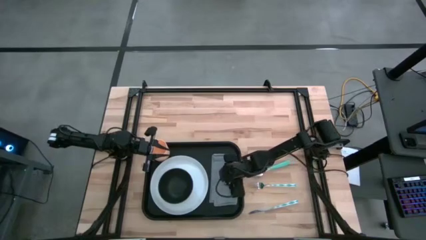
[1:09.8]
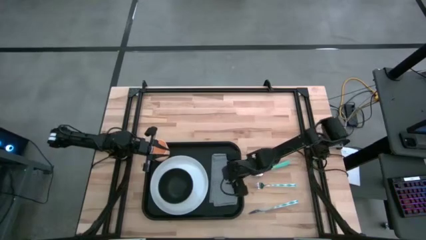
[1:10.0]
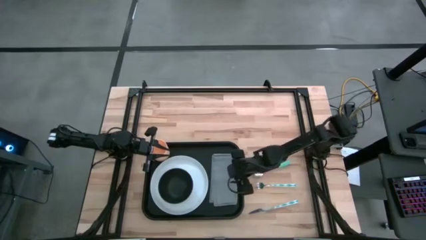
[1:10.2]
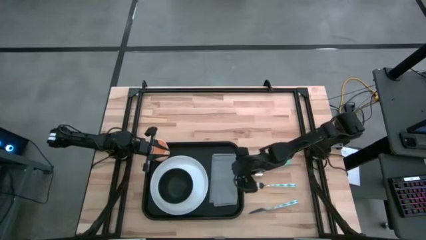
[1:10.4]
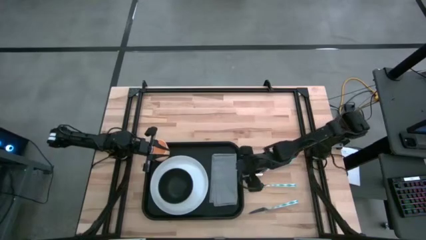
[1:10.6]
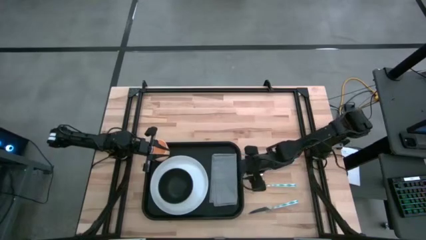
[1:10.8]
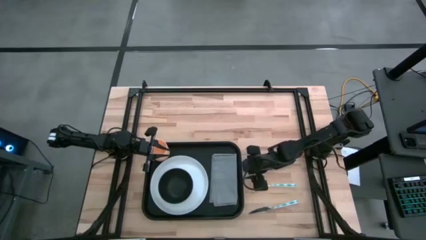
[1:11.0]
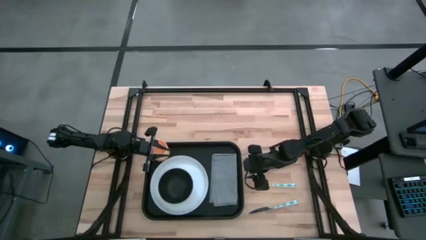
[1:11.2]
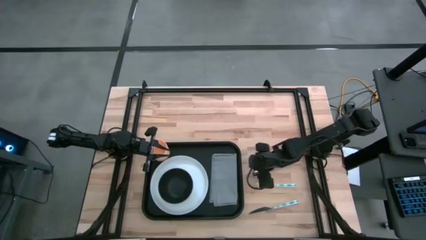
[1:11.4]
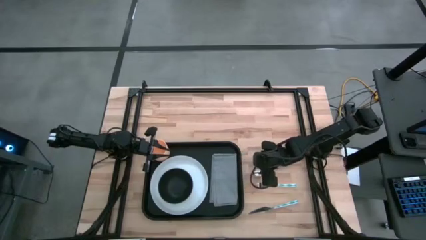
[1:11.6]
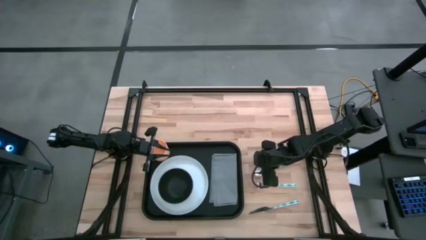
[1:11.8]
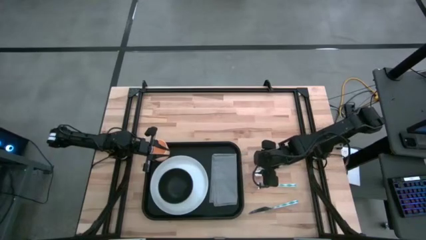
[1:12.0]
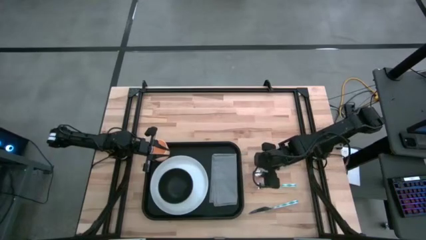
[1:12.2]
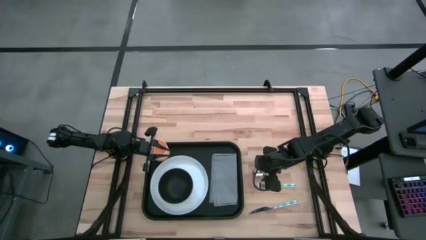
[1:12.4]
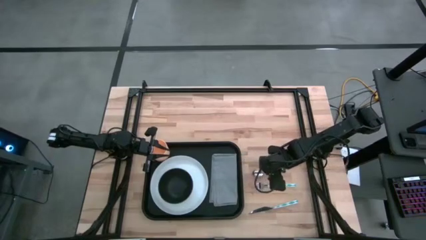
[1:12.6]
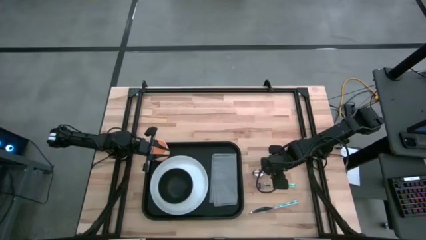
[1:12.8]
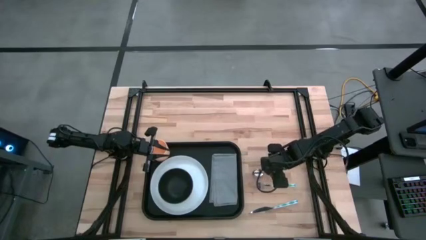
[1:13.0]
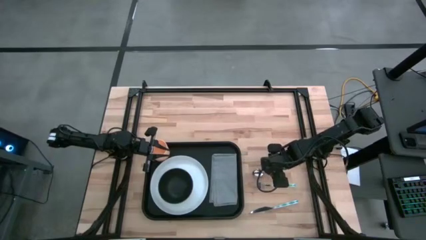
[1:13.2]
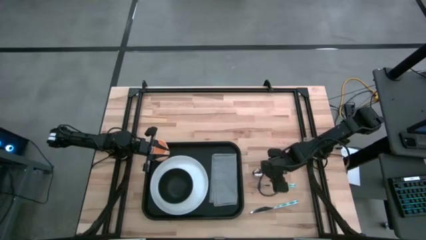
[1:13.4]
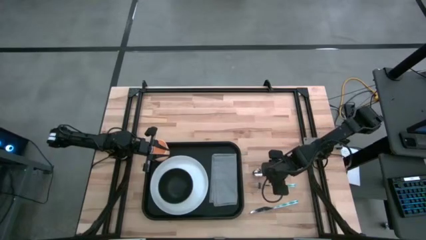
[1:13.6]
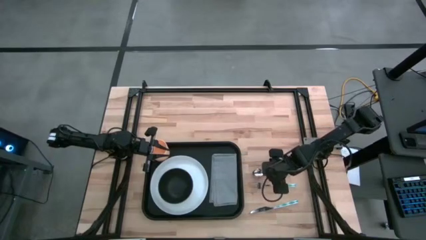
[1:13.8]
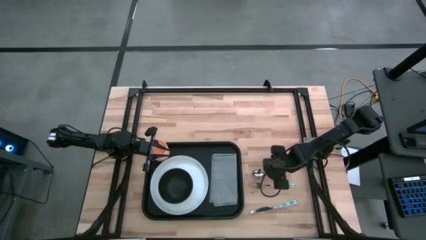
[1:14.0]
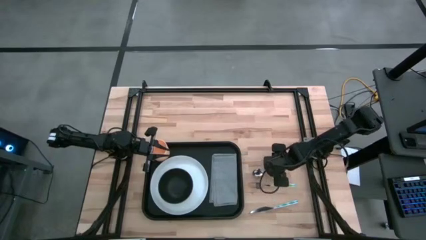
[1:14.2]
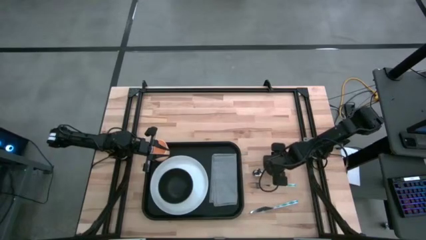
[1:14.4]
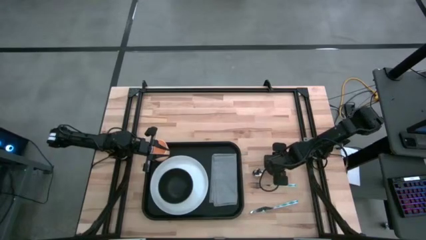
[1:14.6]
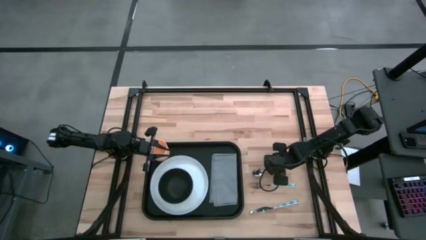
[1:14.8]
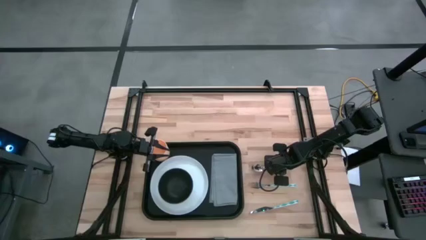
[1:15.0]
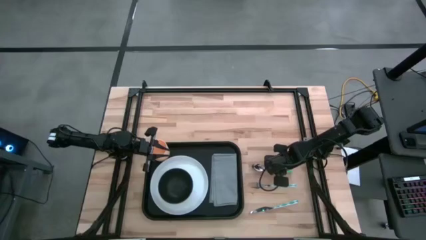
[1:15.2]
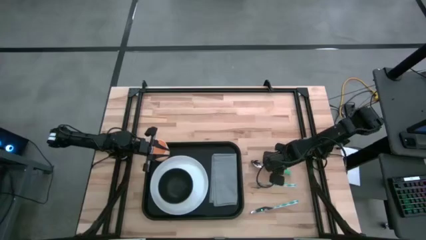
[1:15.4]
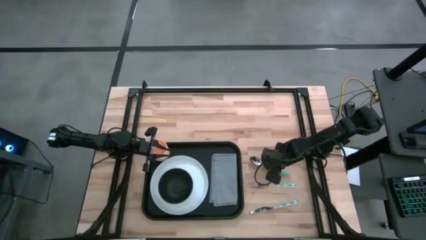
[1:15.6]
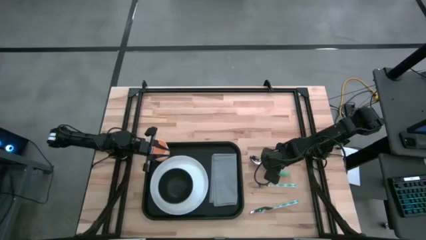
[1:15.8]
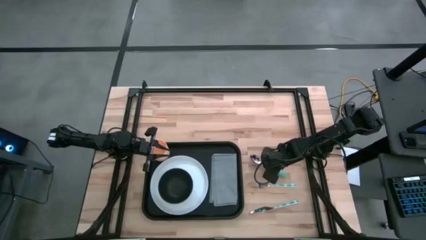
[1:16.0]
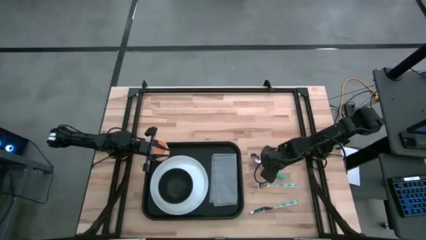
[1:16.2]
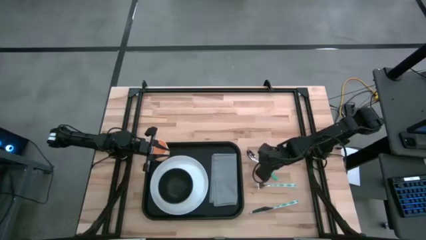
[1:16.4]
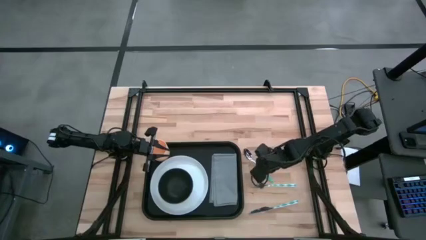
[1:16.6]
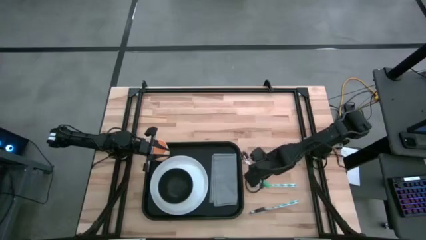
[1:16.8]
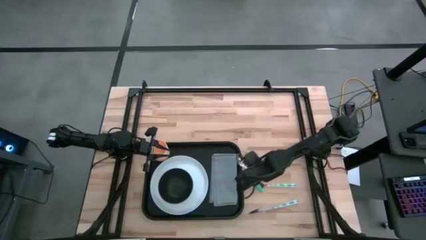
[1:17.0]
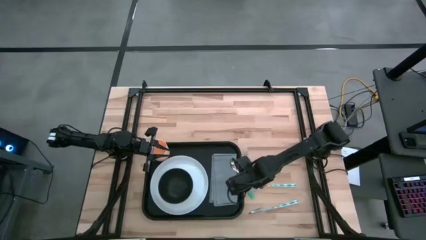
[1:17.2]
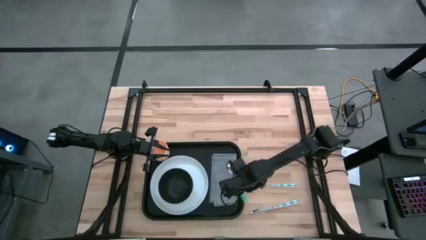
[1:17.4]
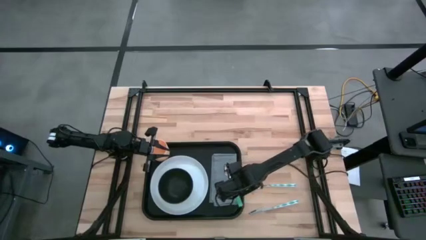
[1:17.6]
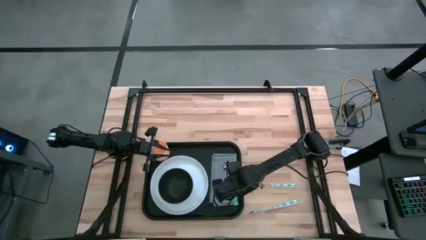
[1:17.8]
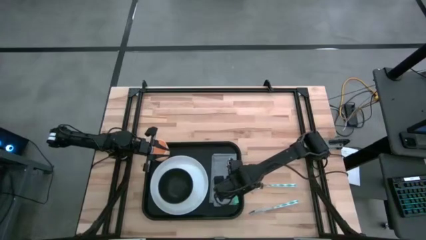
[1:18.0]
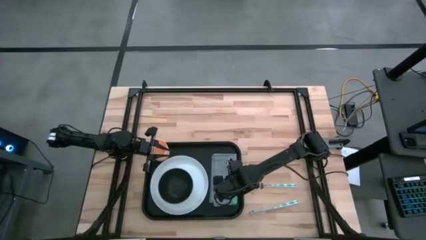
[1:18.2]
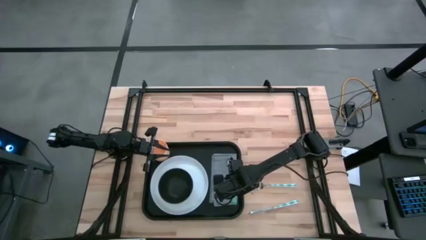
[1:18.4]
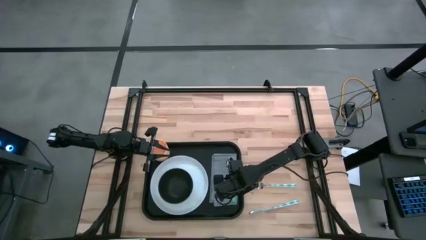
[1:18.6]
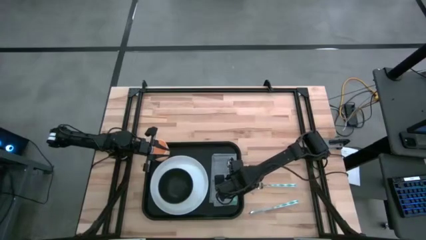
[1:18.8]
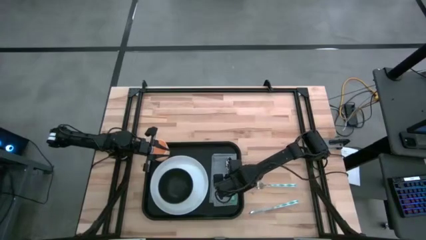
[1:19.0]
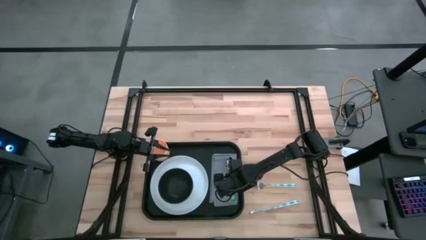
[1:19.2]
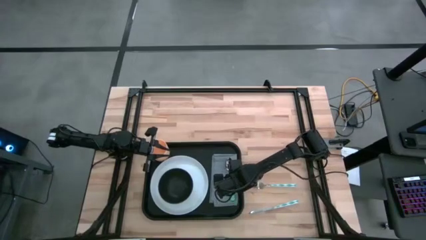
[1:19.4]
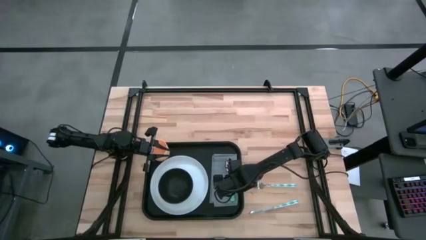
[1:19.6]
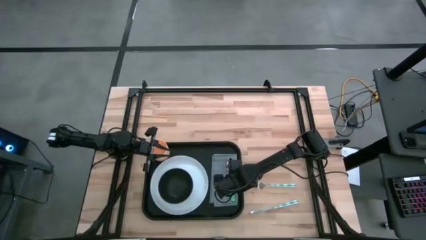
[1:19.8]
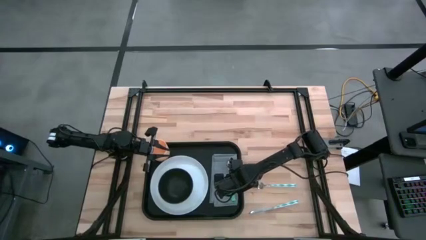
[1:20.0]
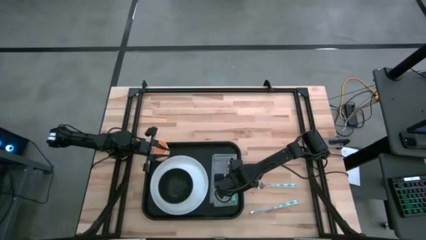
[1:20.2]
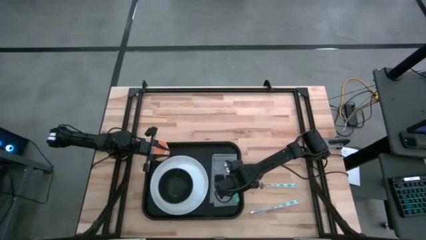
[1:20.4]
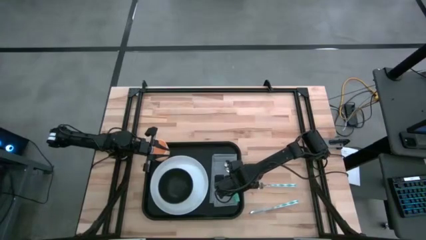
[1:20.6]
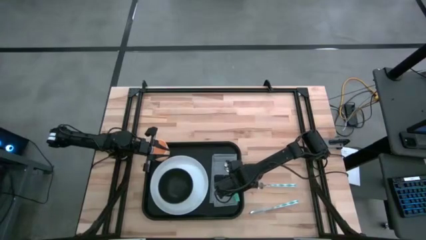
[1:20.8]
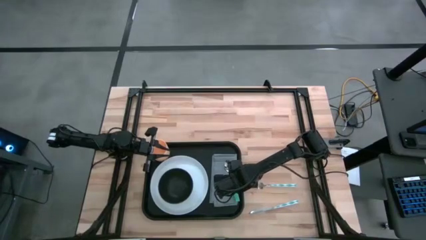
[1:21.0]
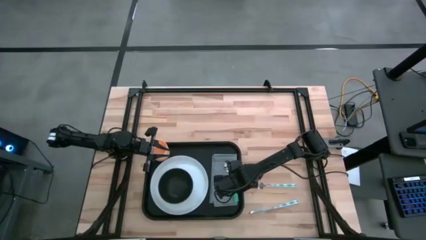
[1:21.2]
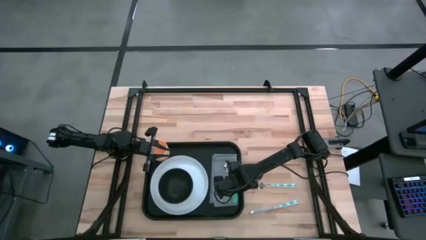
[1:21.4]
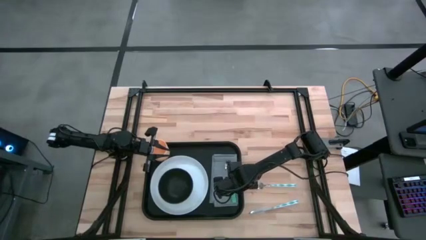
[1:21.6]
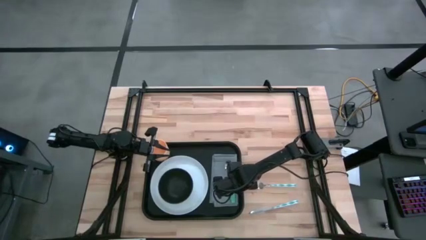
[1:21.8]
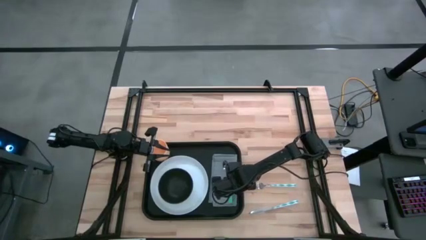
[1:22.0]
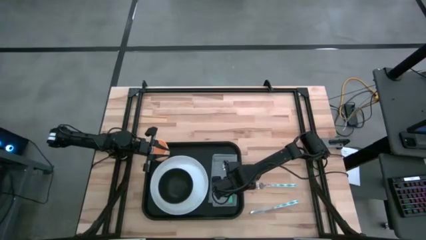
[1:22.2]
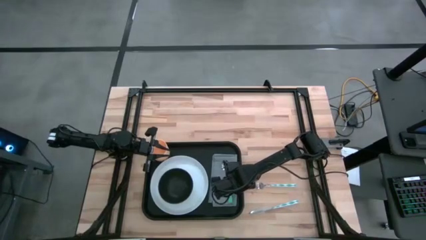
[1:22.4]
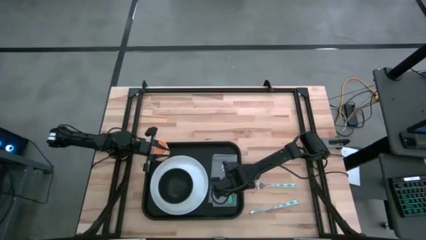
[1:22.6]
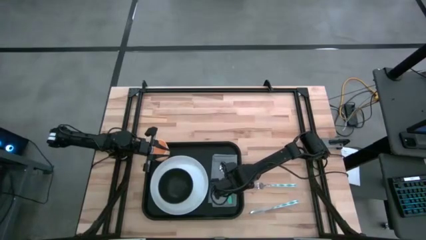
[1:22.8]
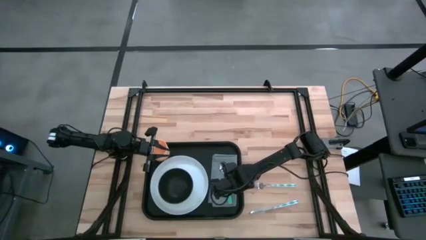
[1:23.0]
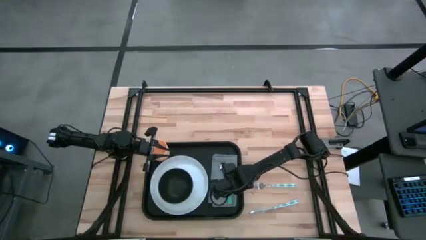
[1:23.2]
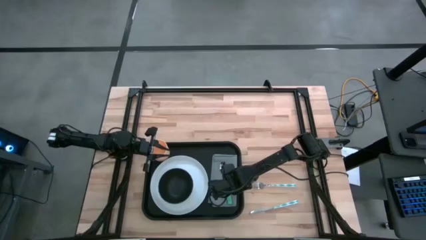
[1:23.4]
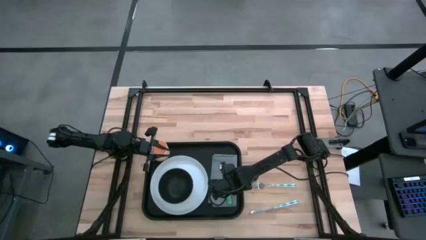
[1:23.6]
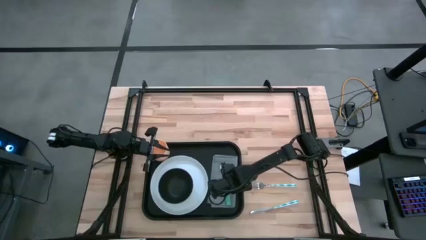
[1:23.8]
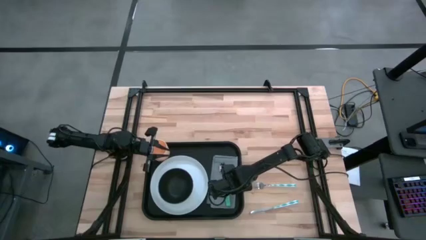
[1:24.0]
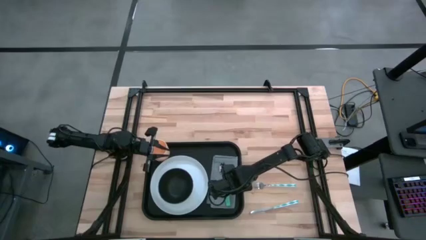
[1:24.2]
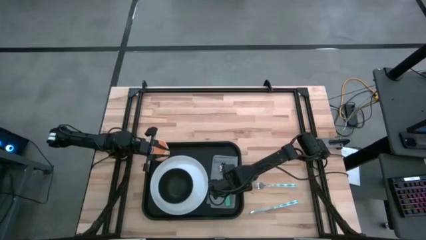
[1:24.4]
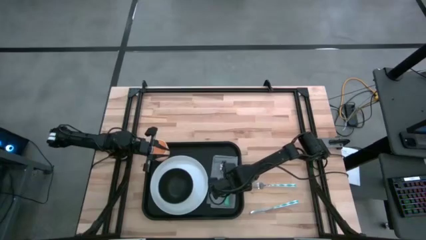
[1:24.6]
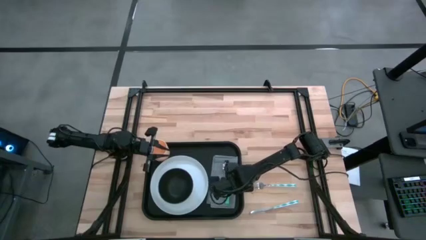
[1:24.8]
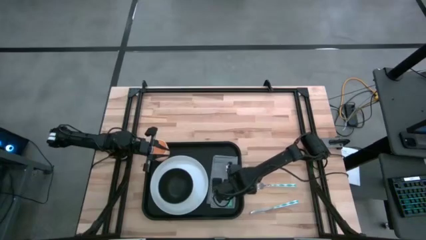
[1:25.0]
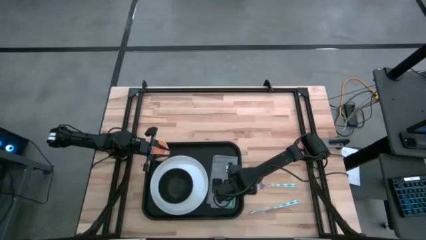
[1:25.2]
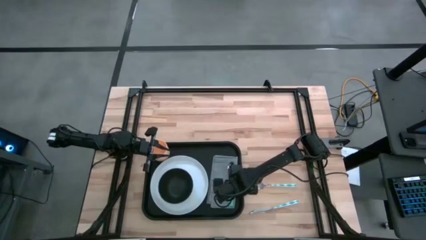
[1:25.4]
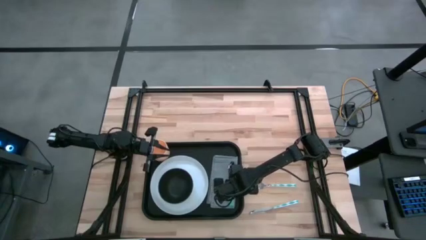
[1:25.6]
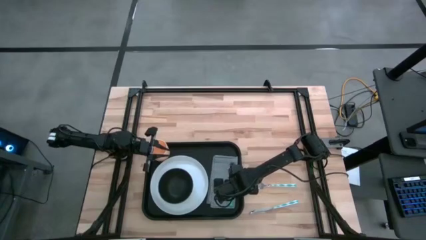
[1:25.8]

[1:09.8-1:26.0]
Task: Set up tray
Put the green spoon on the gray napkin on the black tray
